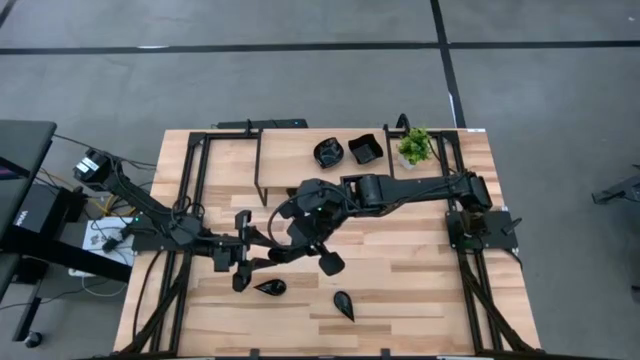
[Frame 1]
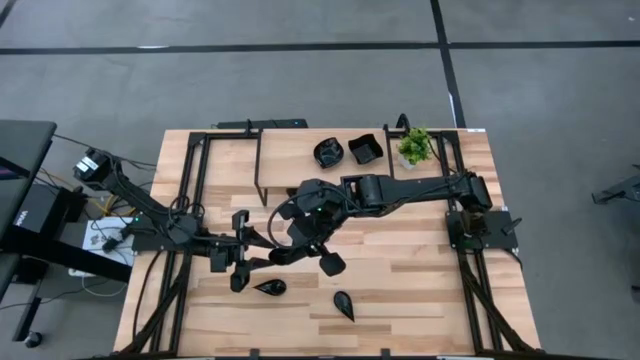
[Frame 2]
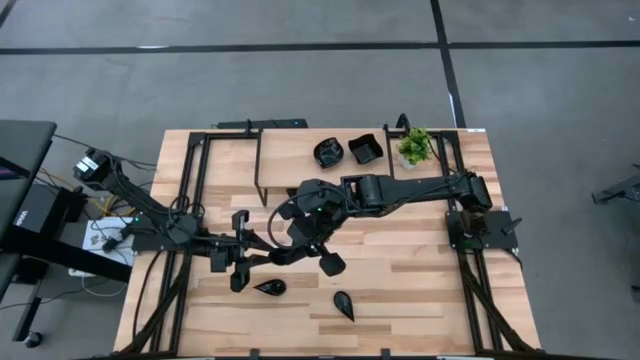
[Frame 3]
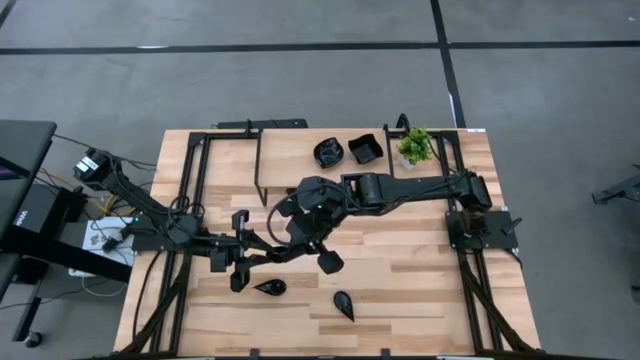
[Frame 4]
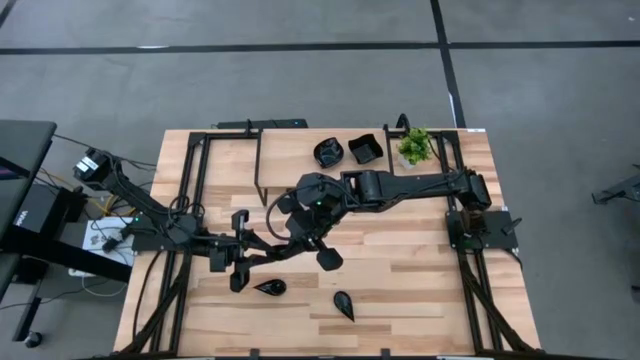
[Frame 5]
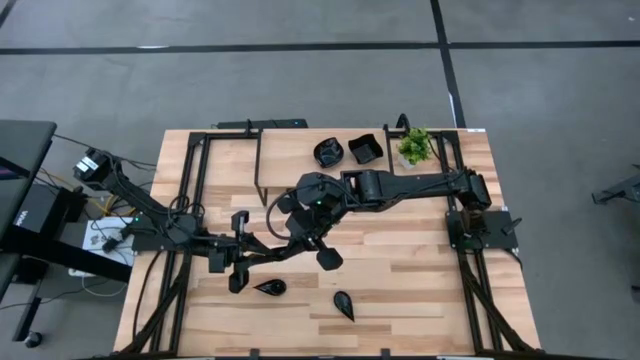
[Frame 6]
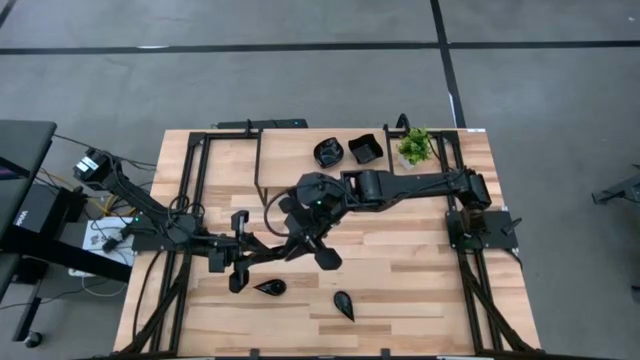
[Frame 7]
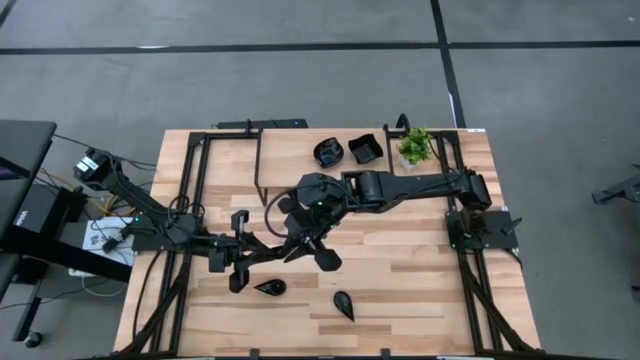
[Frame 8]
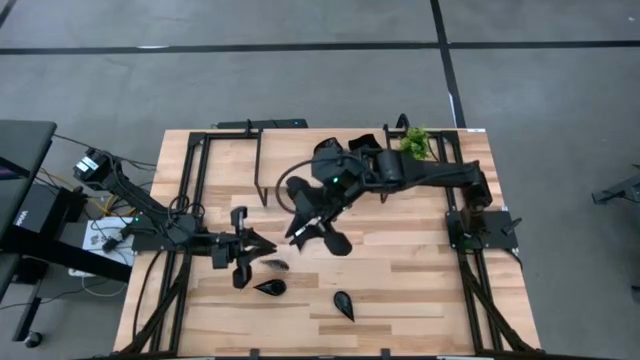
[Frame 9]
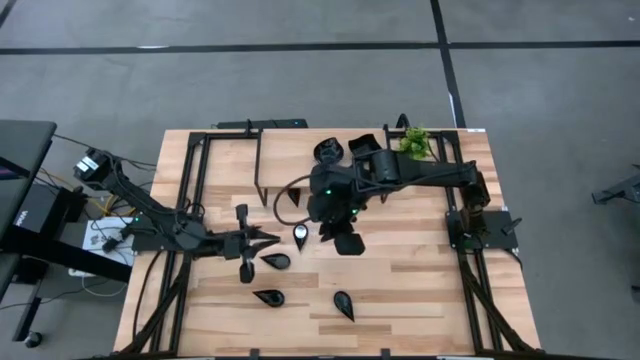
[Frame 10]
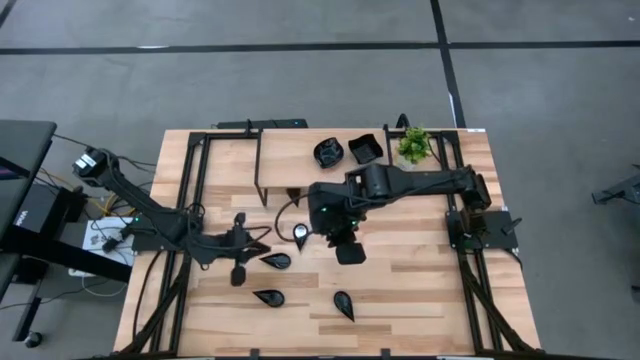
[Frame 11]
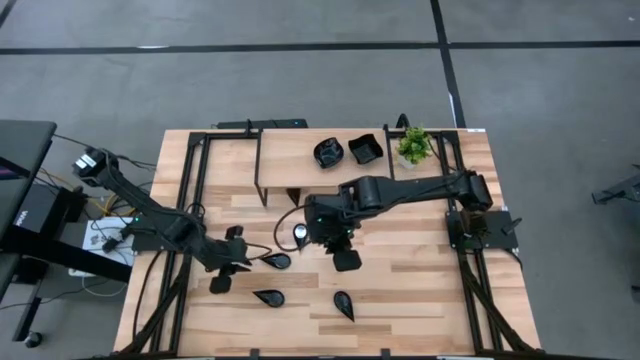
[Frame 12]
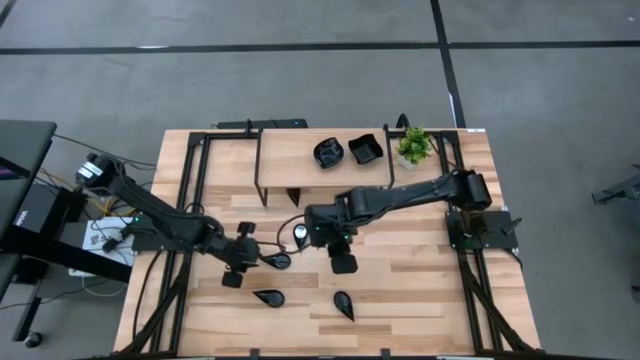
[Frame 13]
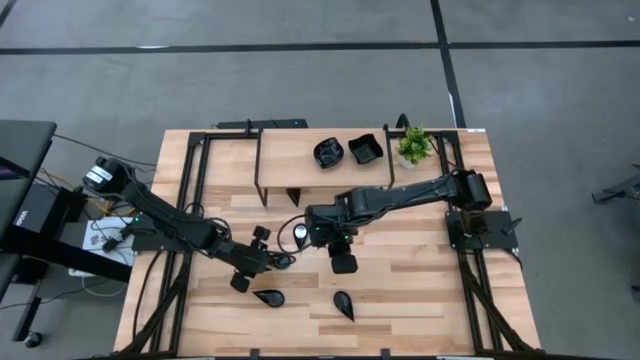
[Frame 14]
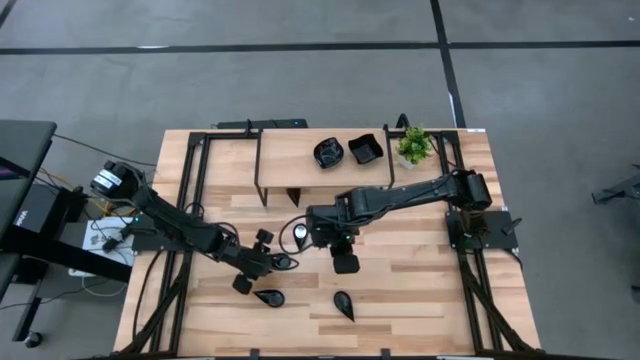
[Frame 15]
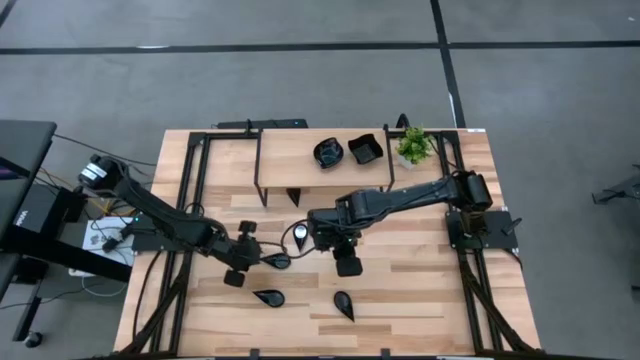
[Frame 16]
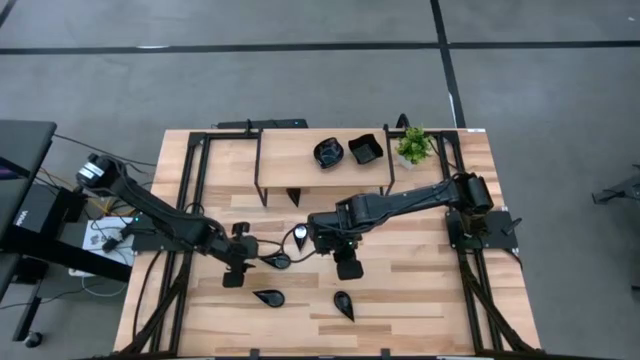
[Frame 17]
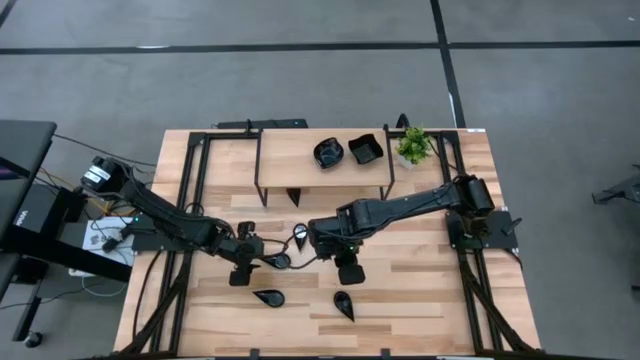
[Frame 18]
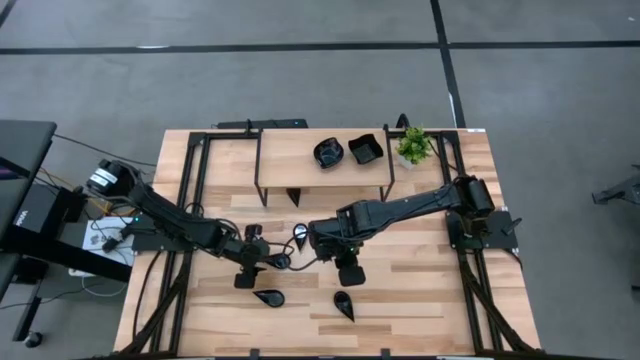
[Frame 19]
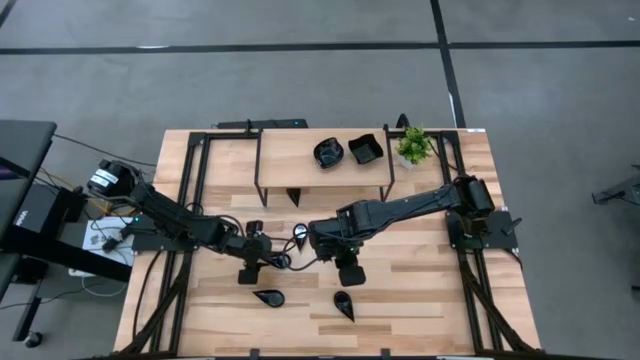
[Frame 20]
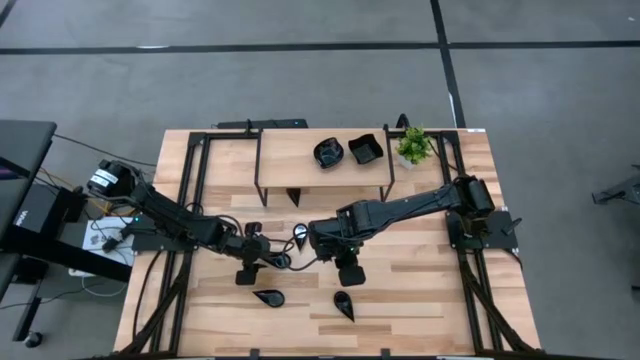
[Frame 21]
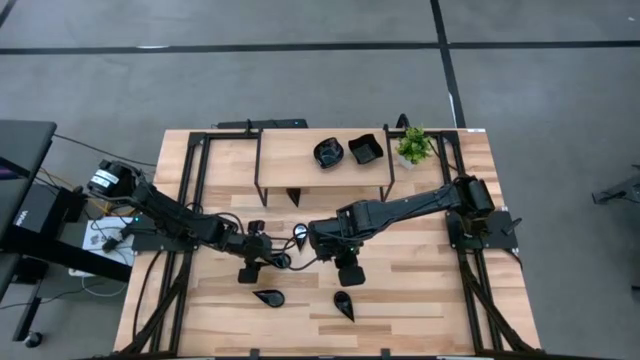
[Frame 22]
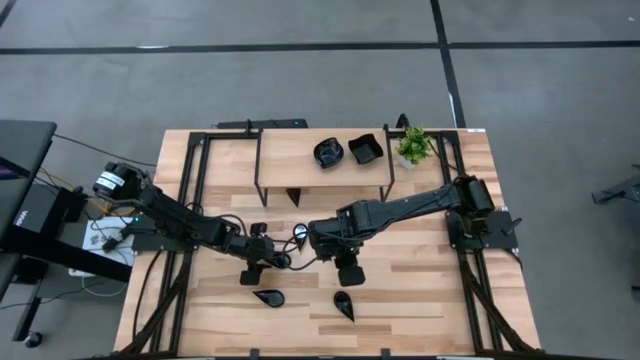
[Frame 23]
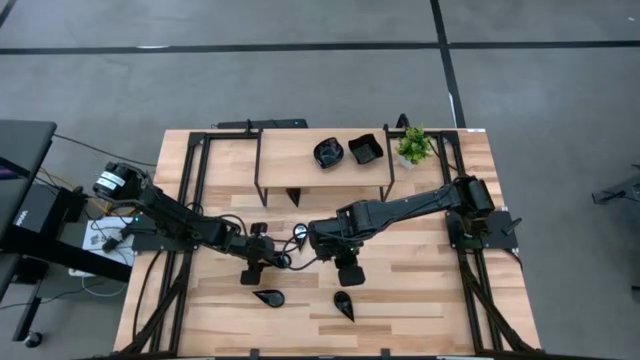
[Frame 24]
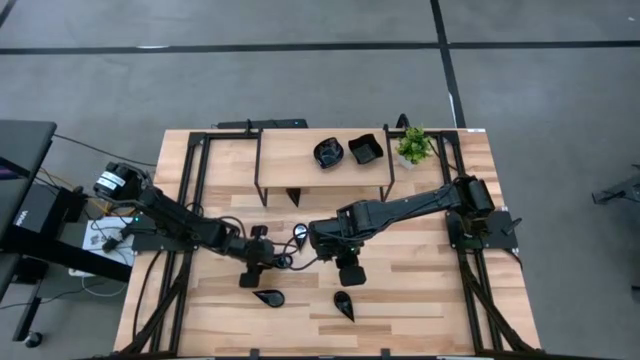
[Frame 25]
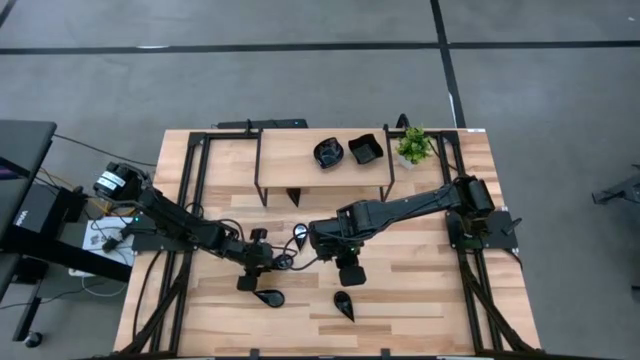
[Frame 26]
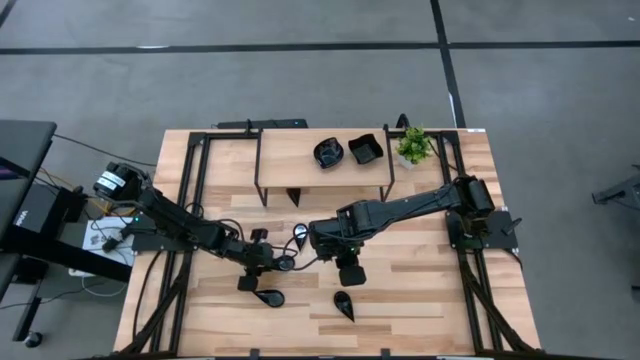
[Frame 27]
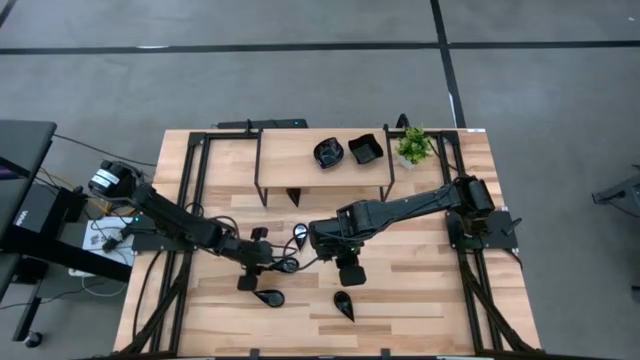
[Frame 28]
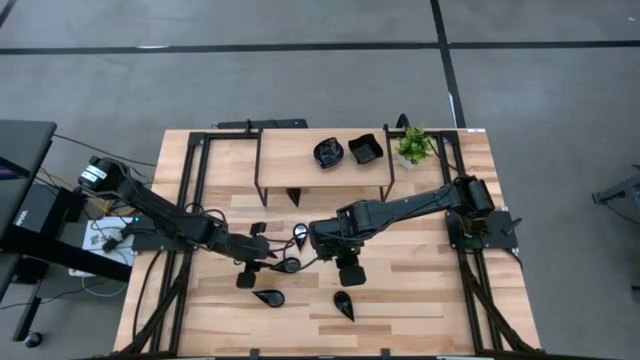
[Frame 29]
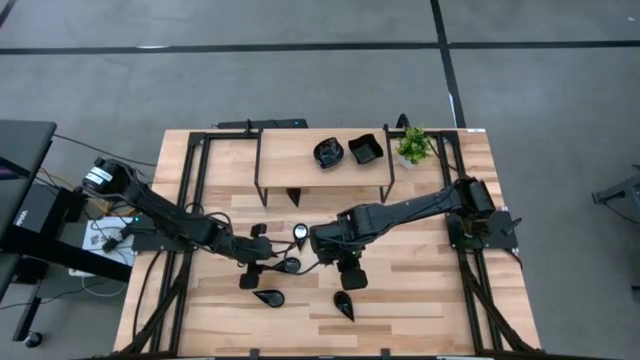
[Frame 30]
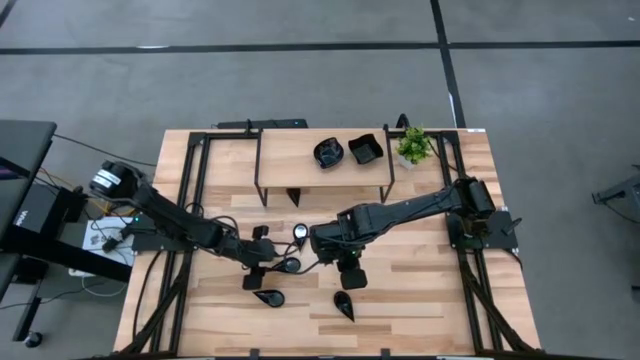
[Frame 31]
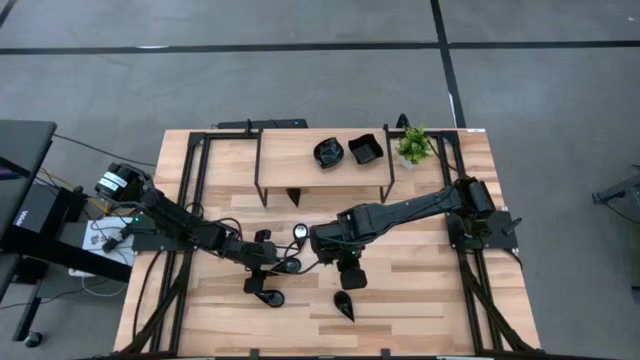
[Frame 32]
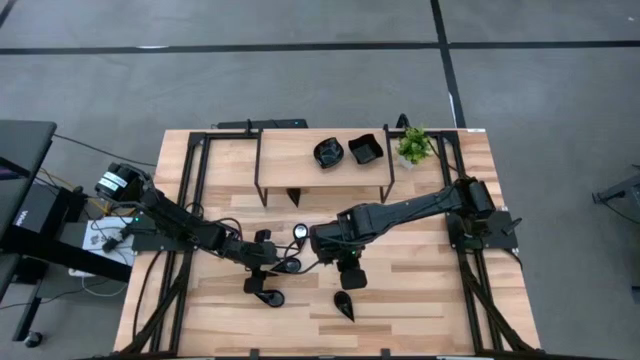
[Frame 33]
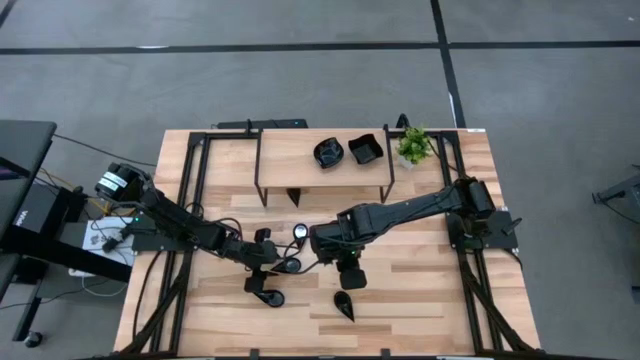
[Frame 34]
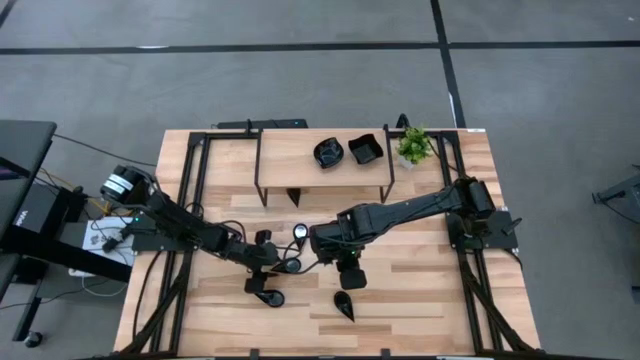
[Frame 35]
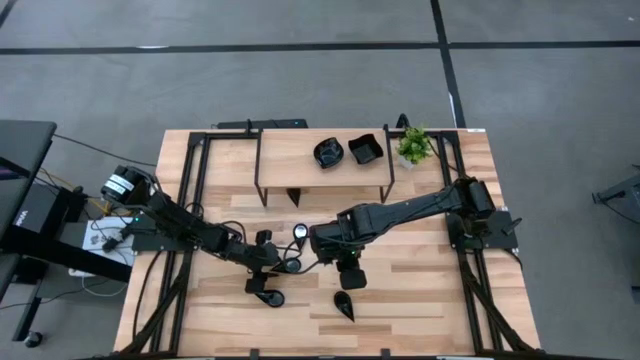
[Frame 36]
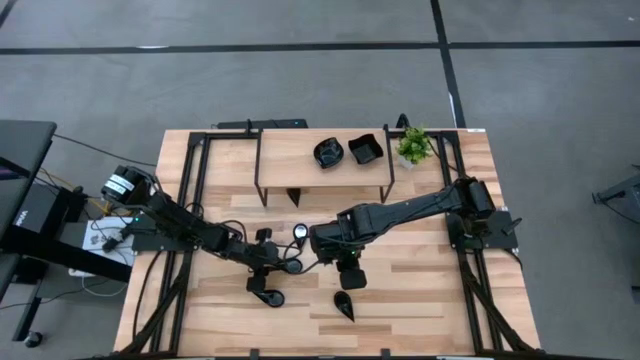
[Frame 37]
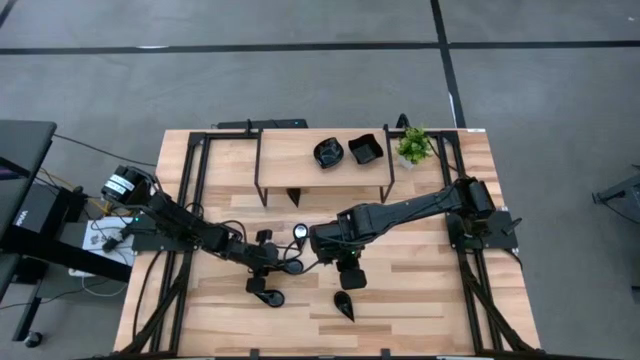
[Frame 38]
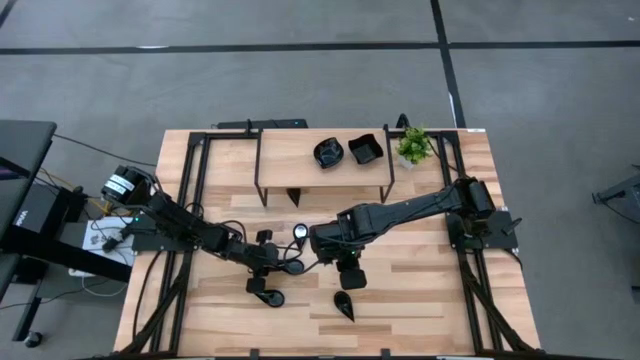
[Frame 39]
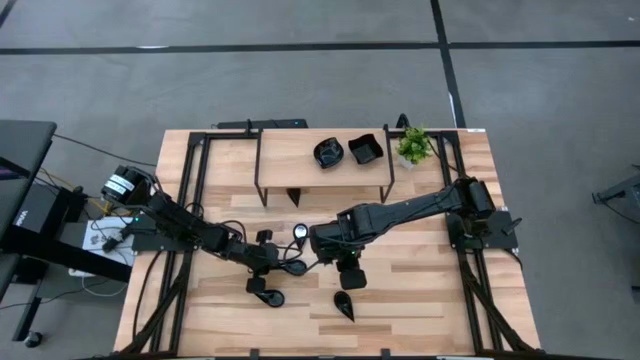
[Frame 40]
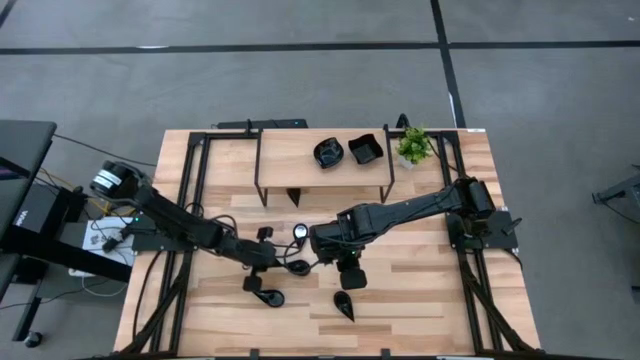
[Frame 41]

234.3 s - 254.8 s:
Task: Pick & Place Mini shaped plates
Put the black drop shaped plate on the shelf
